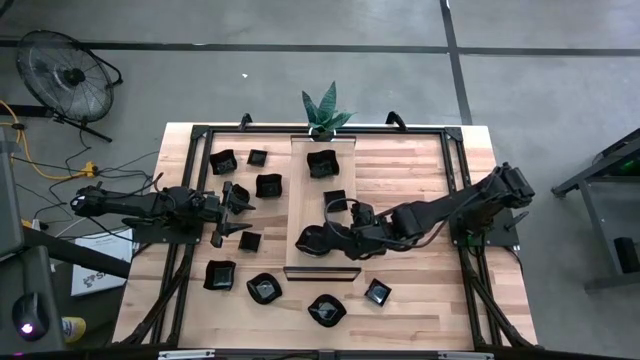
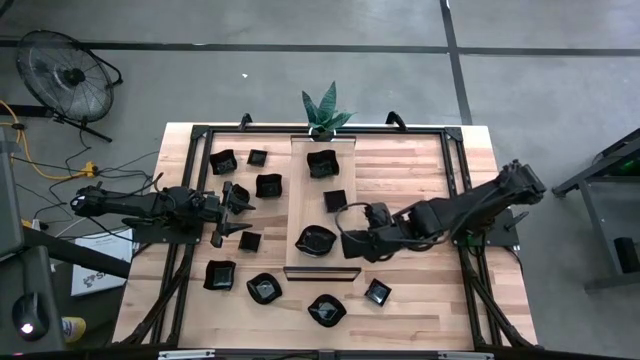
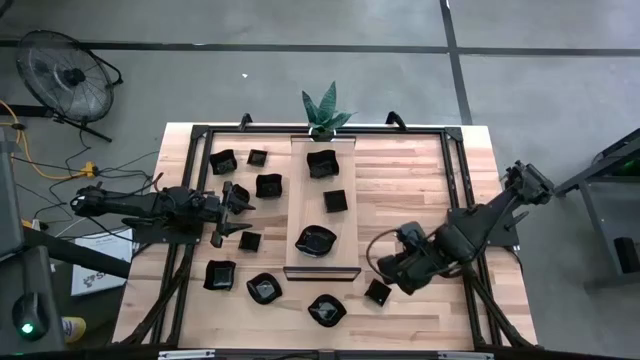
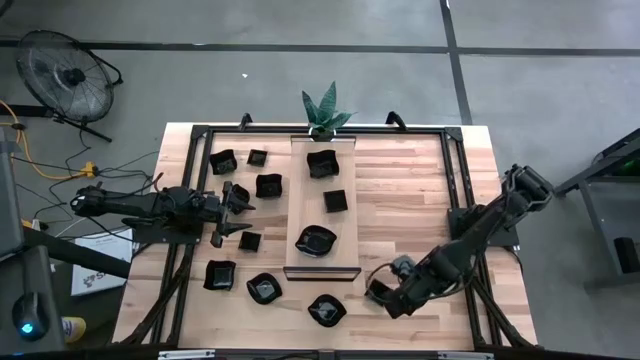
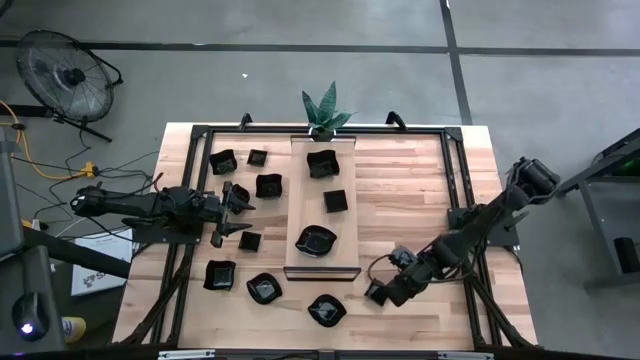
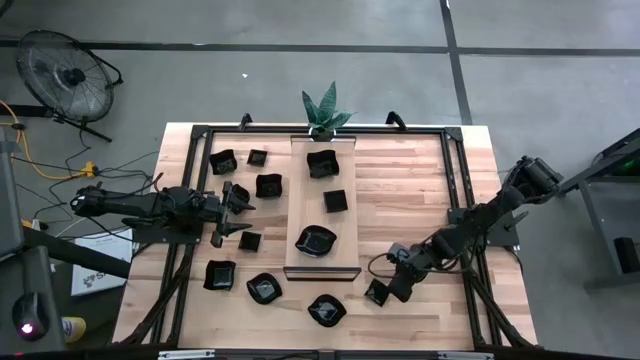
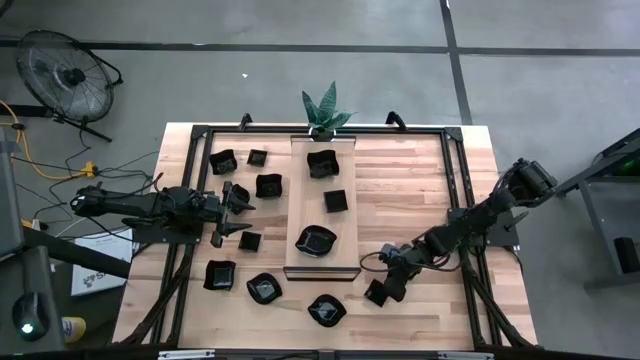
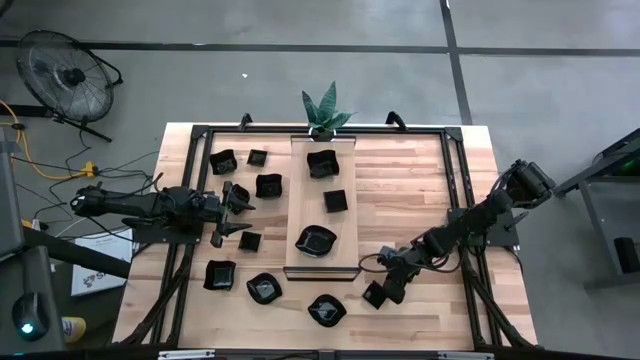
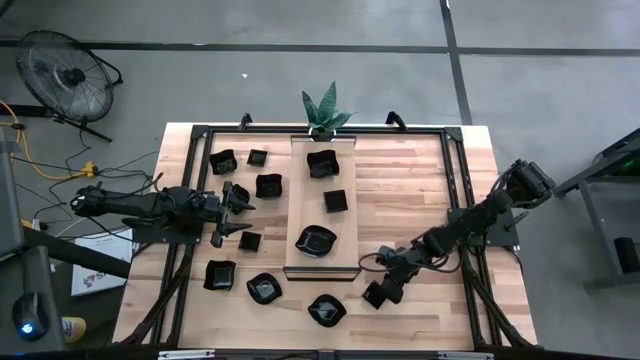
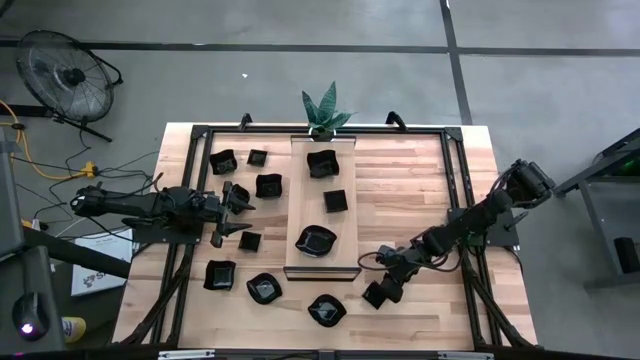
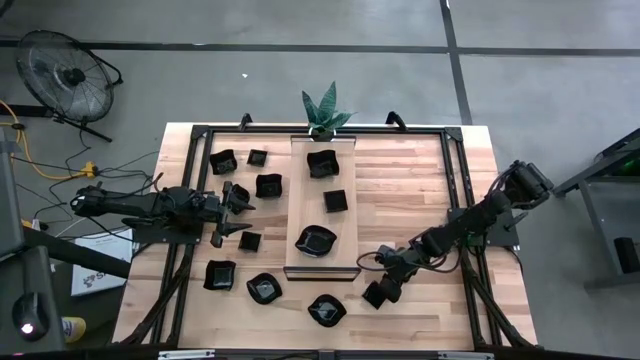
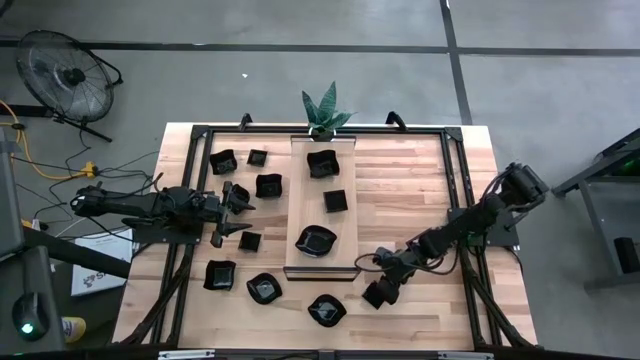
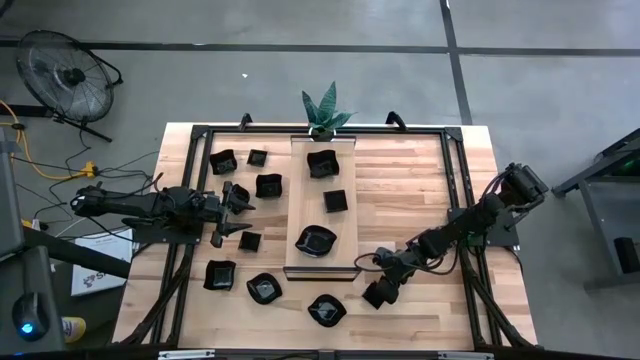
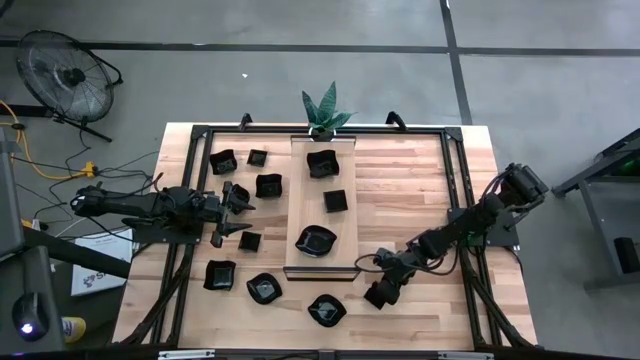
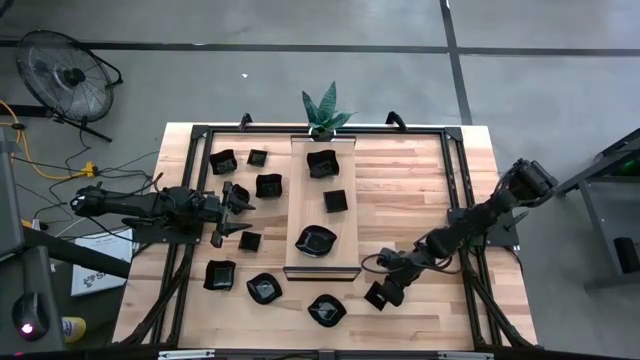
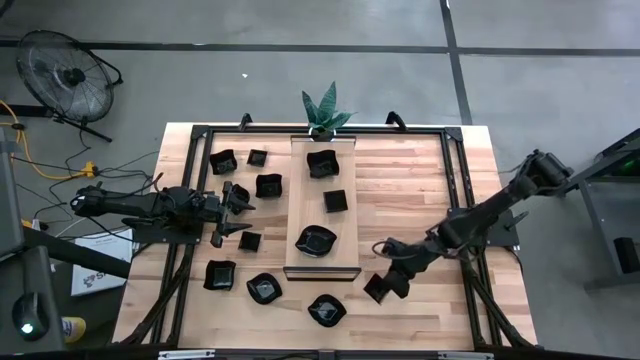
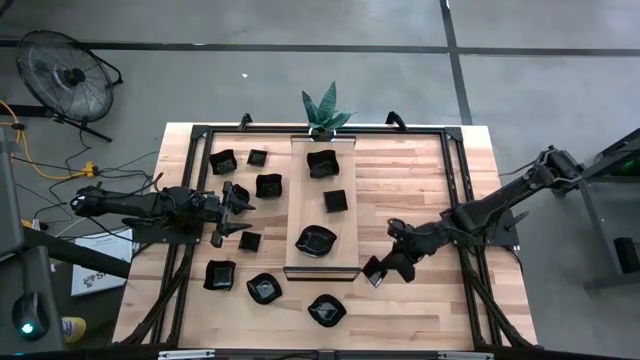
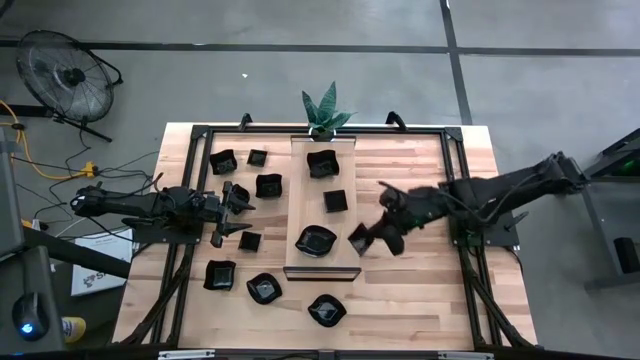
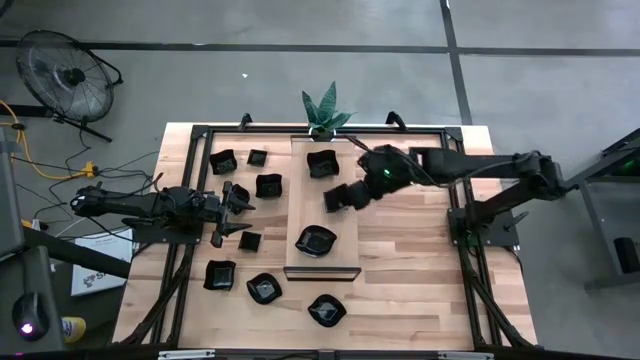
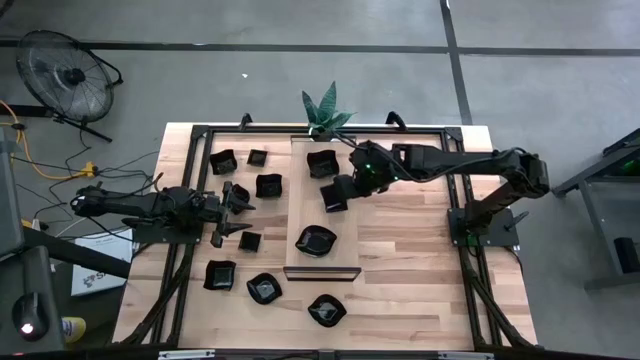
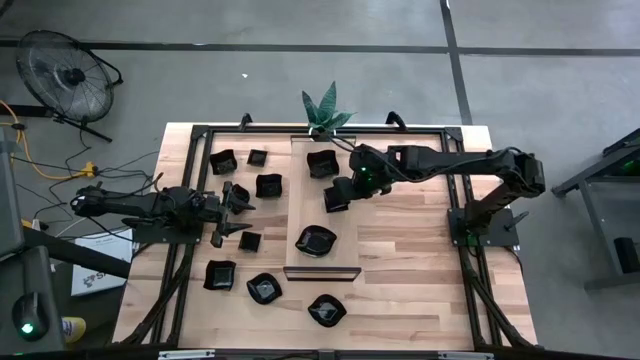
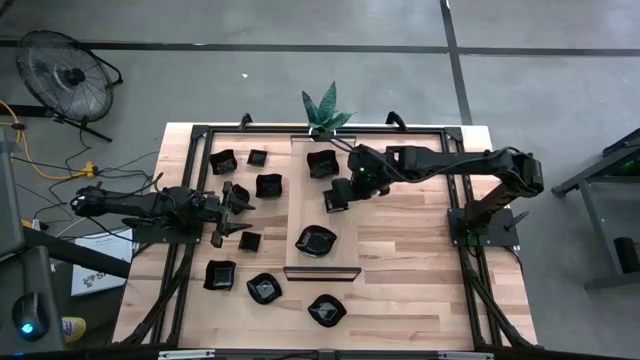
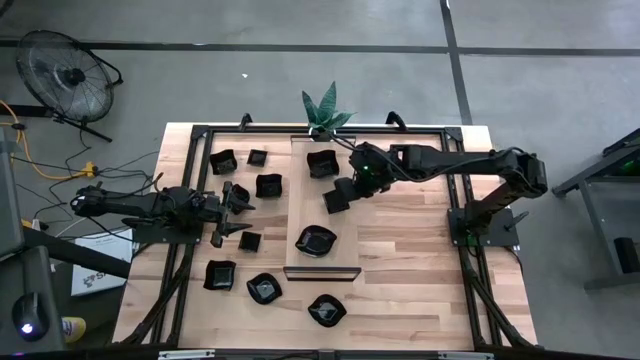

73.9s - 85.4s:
Task: Pick & Place Mini shaped plates
Stack the black square plate on top of the black square plate on the shelf

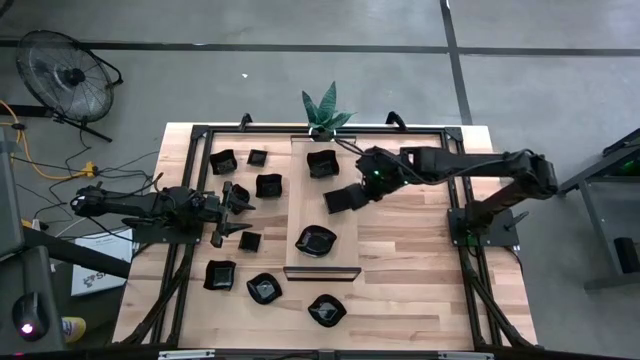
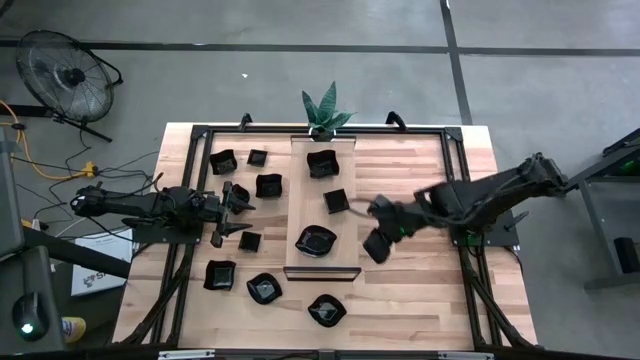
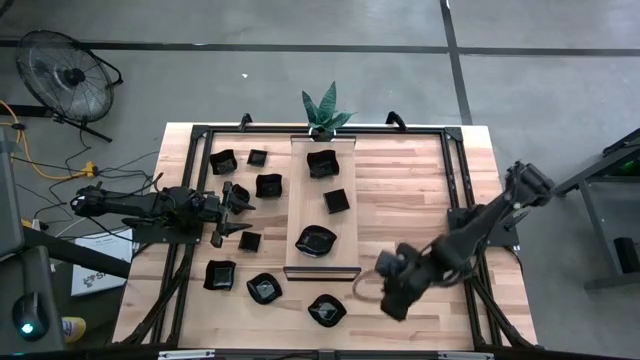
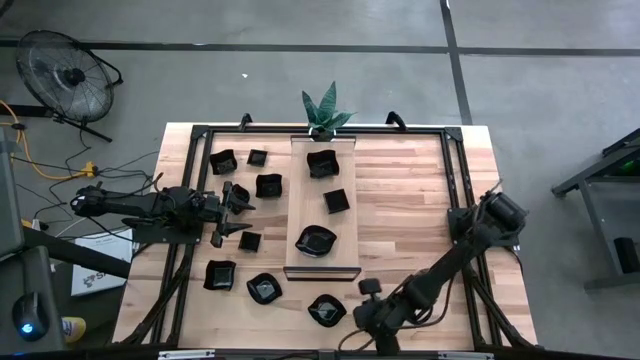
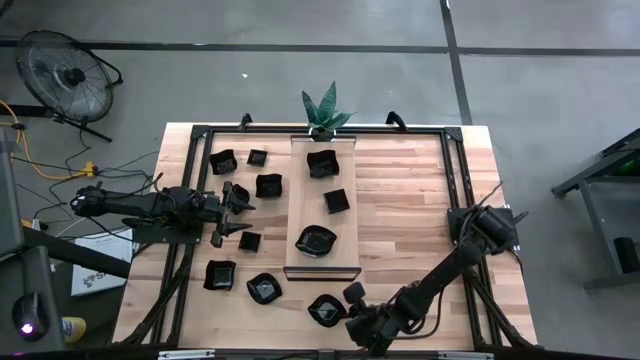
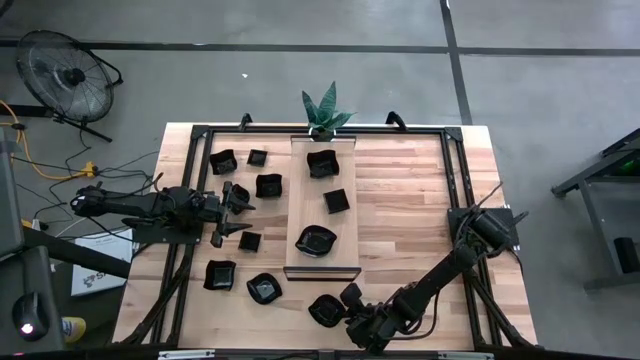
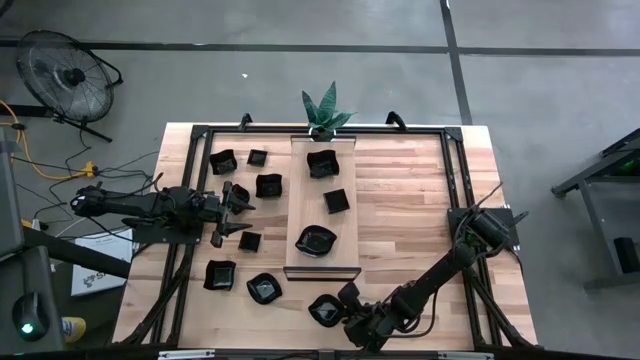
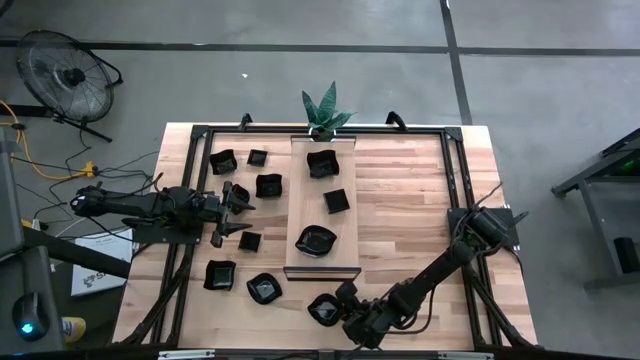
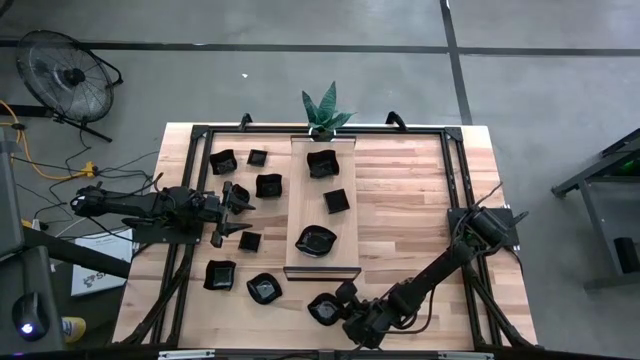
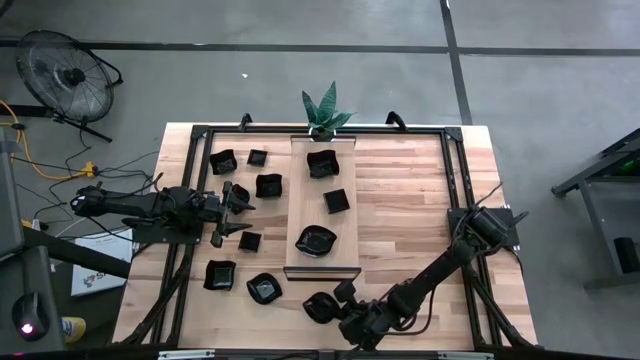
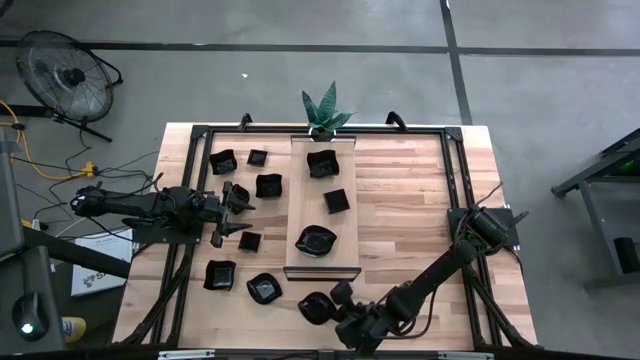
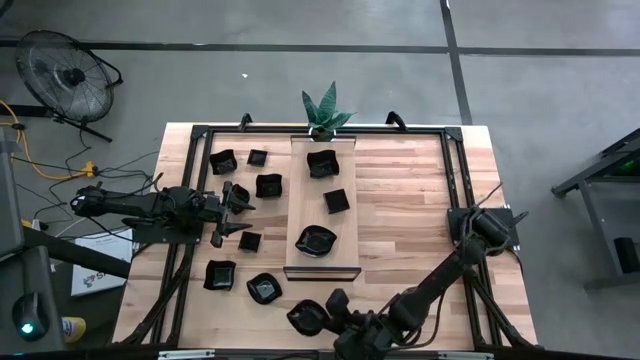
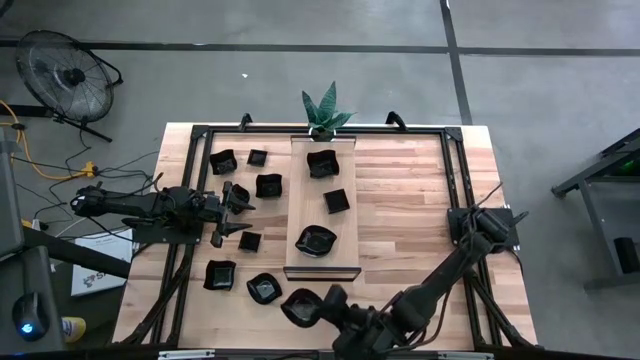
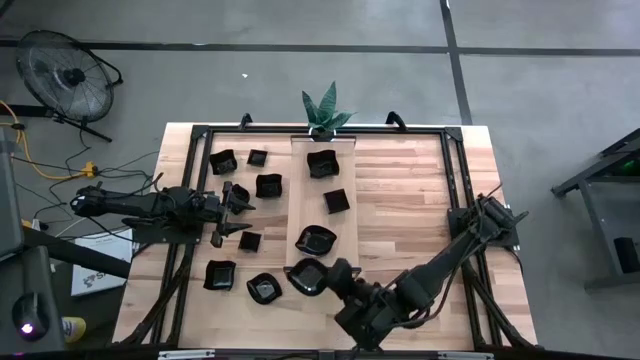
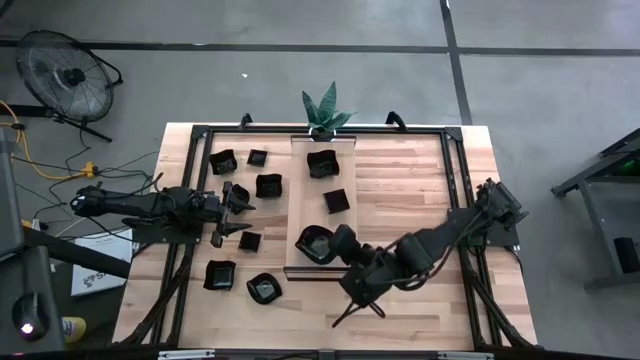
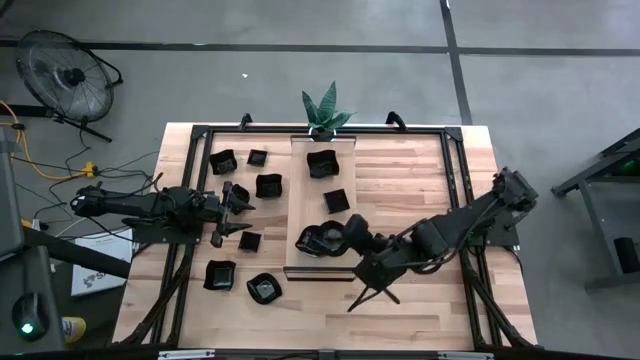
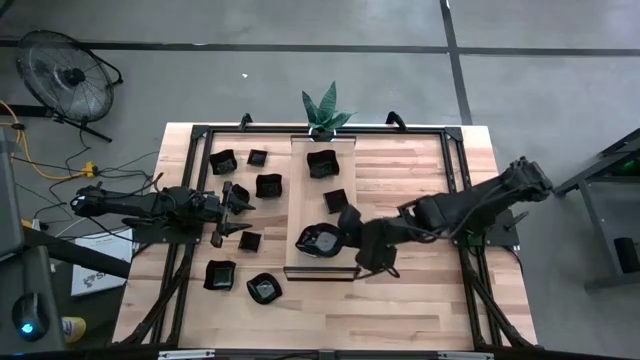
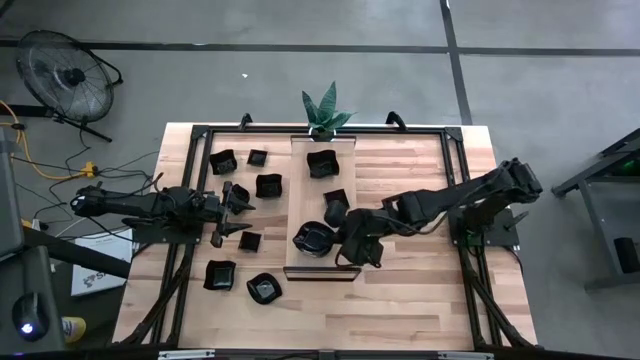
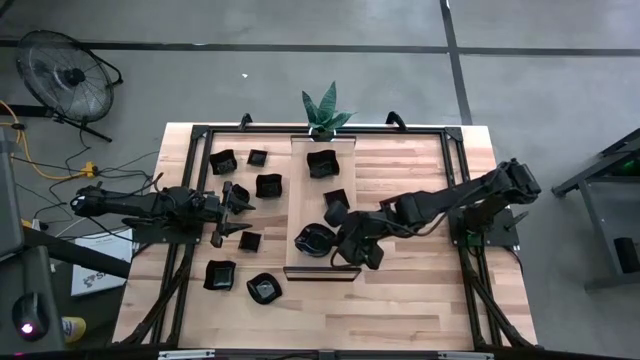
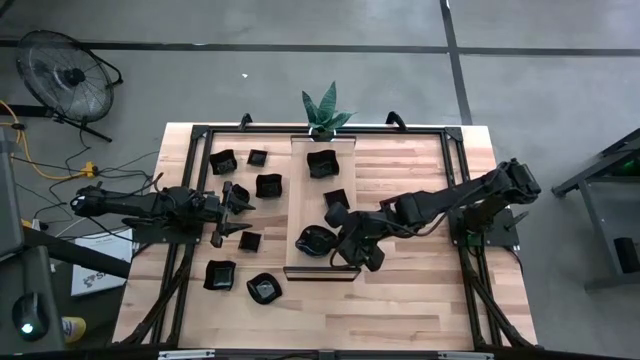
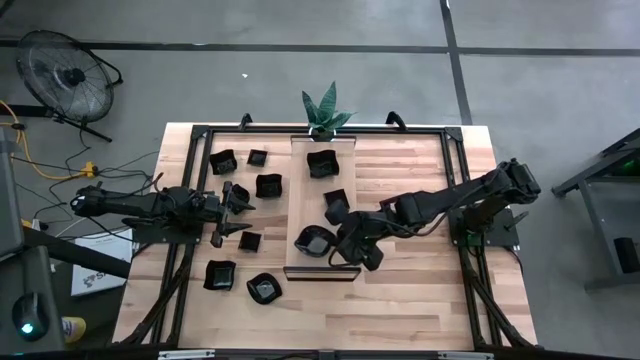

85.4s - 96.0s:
Stack the black leaf shaped plate on top of the black leaf shaped plate on the shelf
